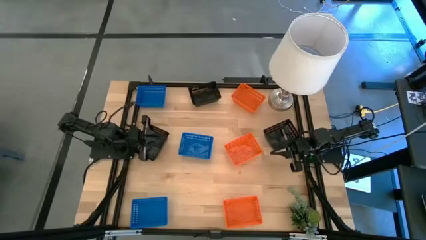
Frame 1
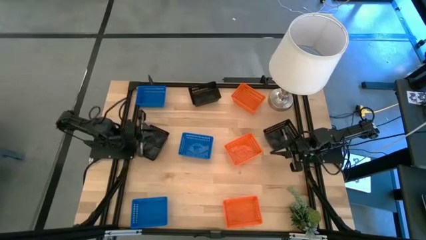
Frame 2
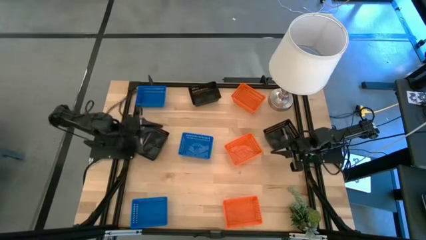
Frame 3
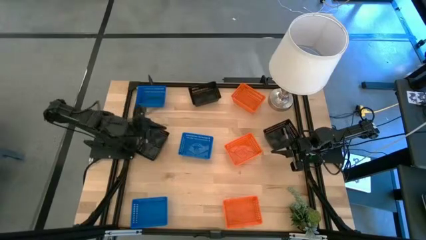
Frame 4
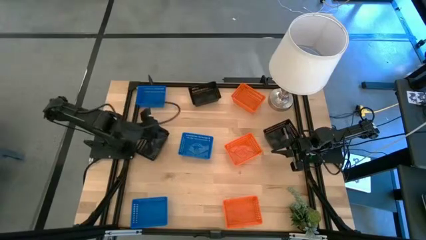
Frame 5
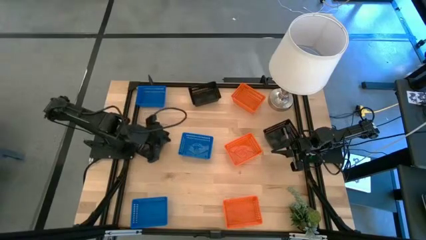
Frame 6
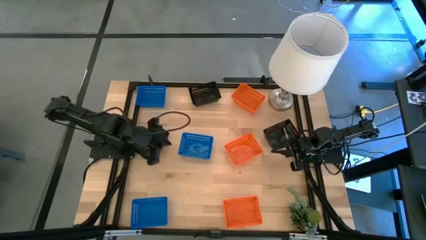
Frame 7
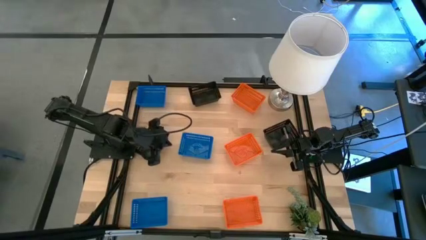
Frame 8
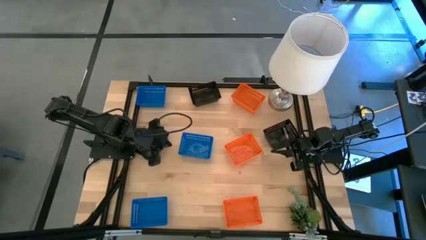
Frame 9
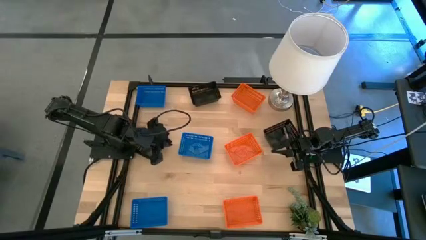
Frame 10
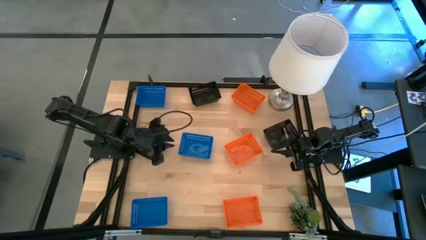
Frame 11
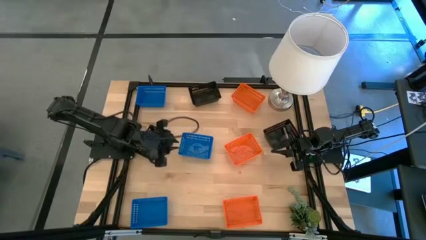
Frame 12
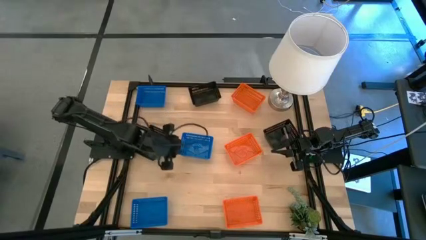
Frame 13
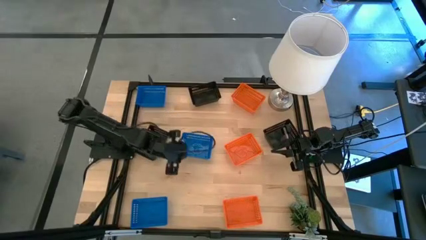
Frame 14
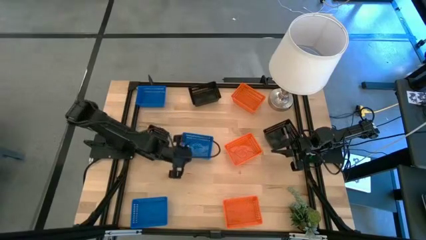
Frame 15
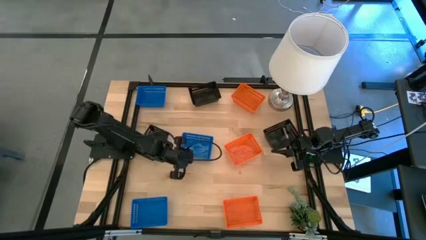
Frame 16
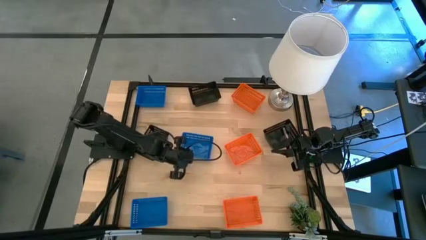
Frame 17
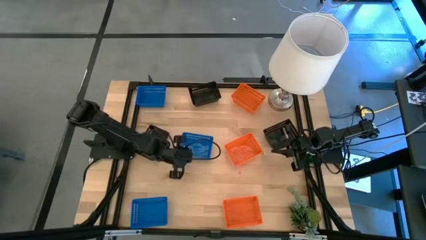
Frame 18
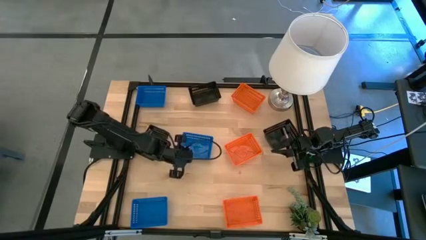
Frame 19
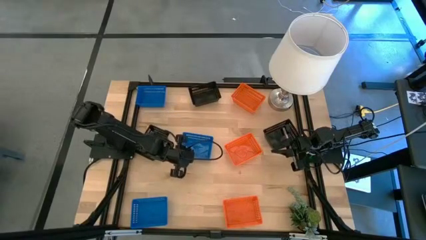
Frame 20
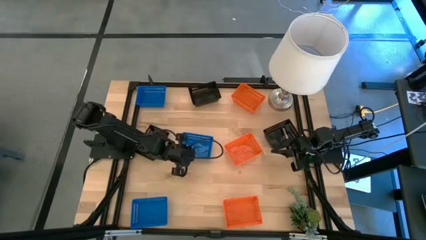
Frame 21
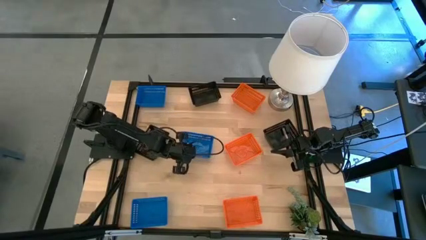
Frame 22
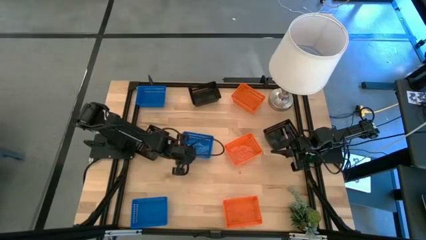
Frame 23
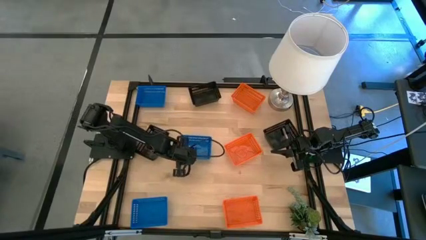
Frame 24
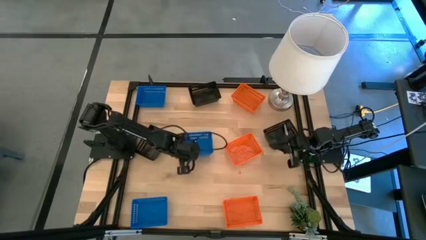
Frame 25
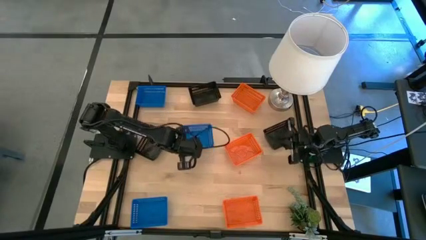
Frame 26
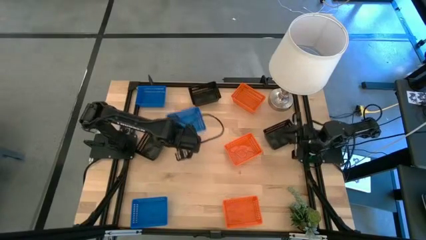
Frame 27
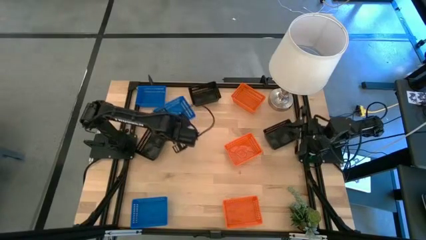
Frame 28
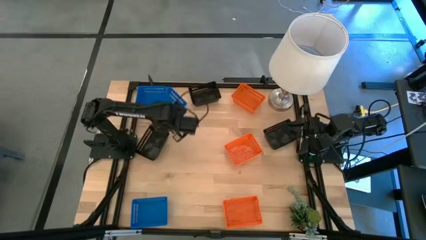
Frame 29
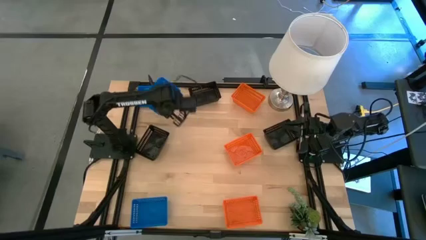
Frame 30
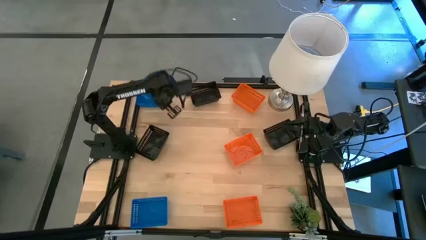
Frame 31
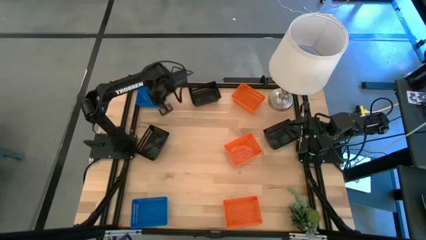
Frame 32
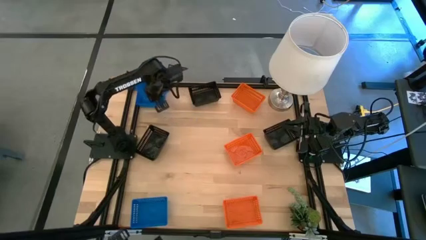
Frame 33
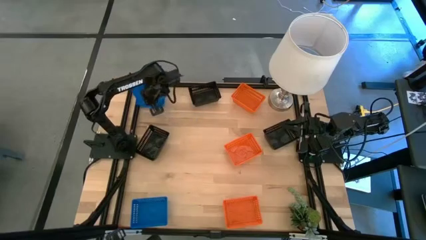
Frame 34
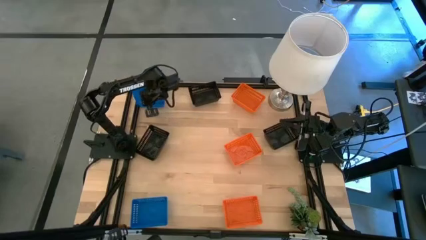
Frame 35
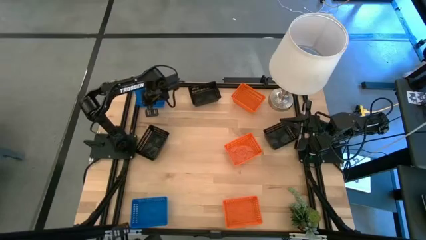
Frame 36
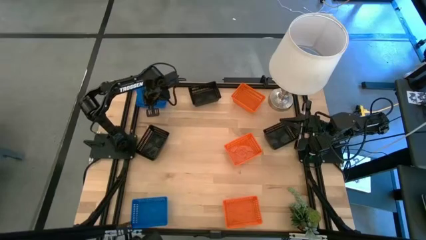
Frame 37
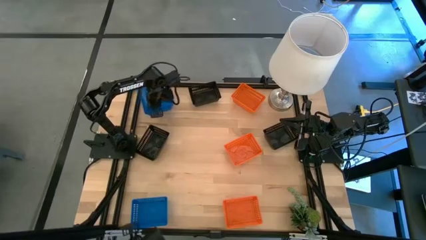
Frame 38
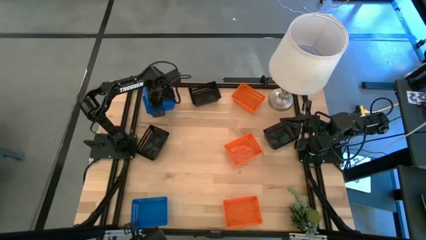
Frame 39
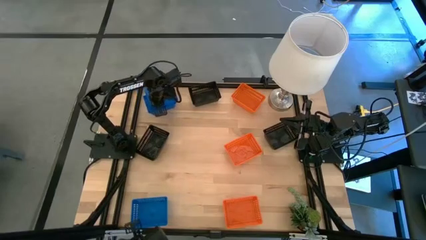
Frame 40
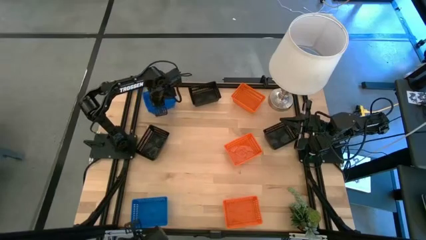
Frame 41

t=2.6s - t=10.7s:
Stack the middle blue bin on top of the top blue bin

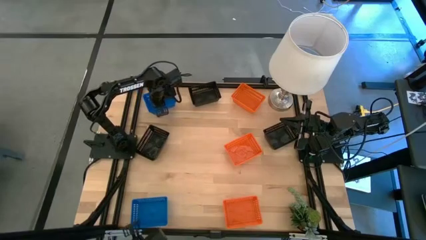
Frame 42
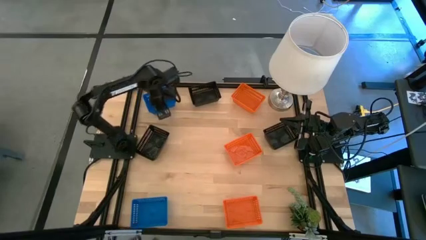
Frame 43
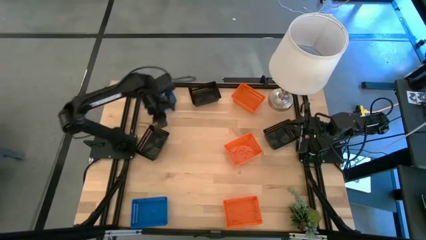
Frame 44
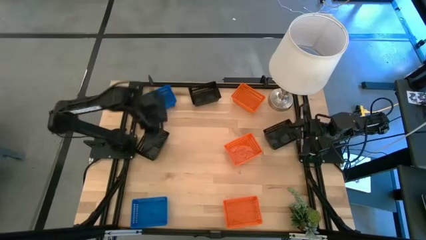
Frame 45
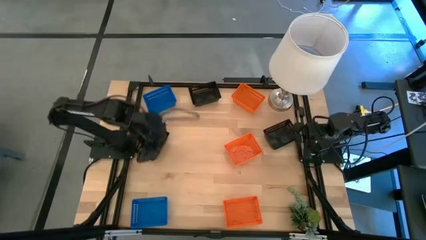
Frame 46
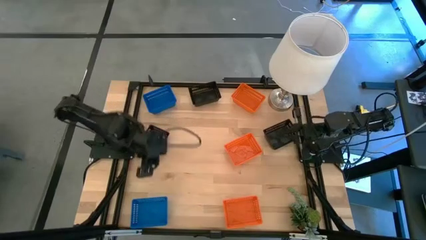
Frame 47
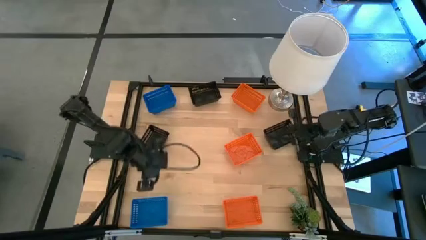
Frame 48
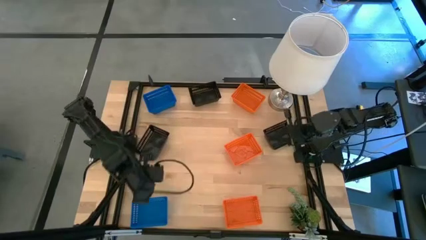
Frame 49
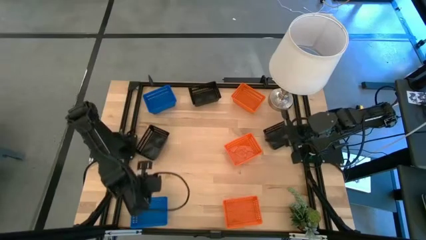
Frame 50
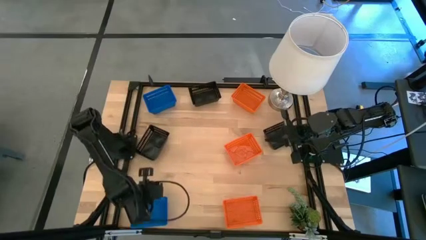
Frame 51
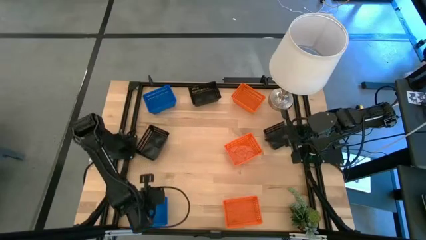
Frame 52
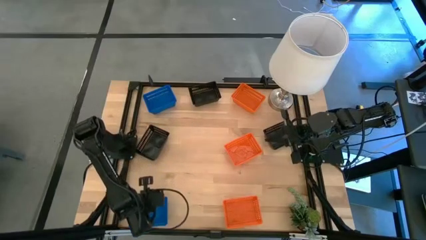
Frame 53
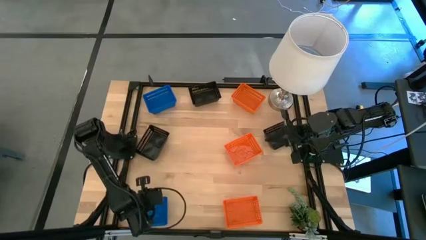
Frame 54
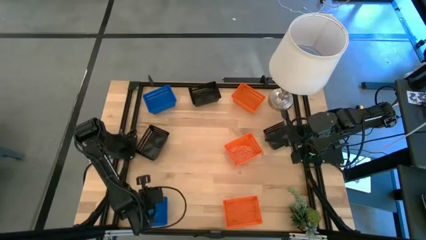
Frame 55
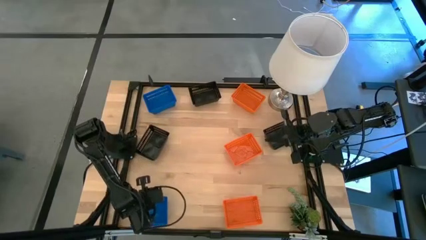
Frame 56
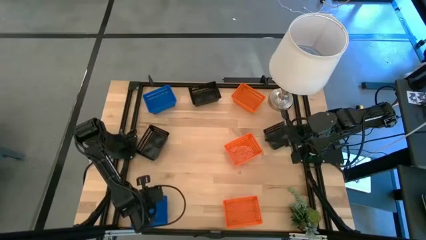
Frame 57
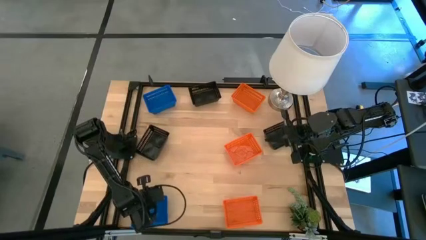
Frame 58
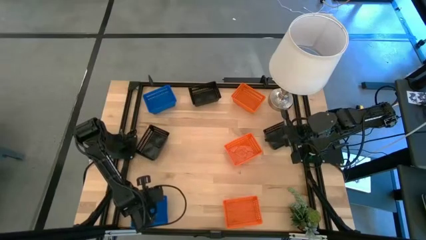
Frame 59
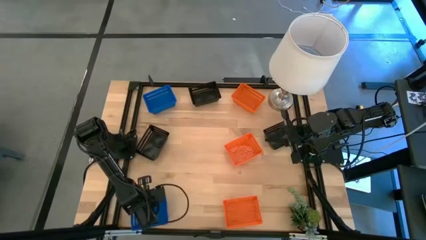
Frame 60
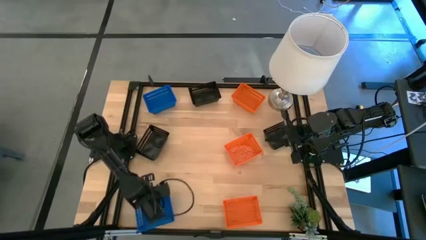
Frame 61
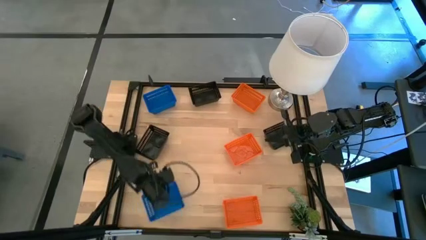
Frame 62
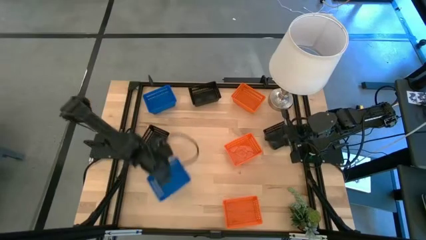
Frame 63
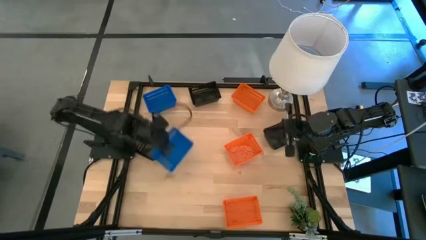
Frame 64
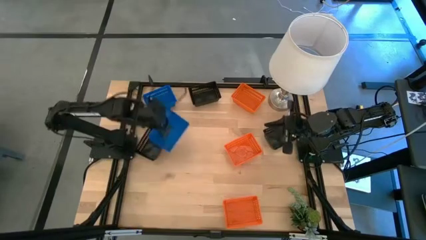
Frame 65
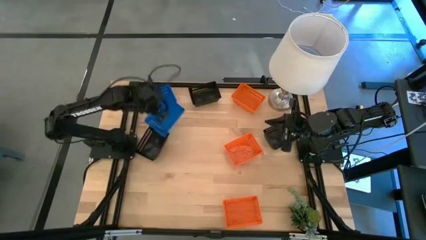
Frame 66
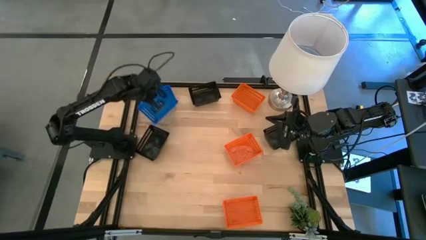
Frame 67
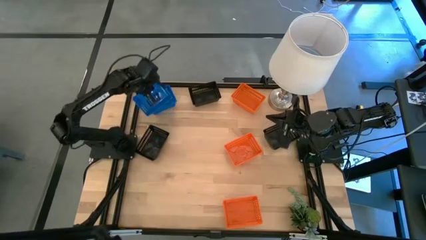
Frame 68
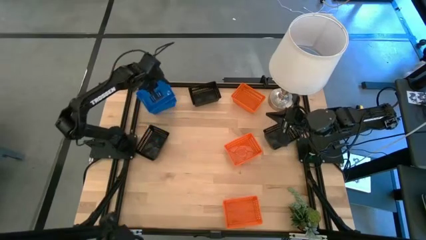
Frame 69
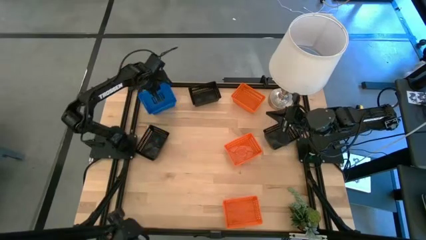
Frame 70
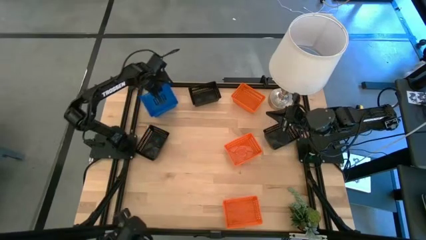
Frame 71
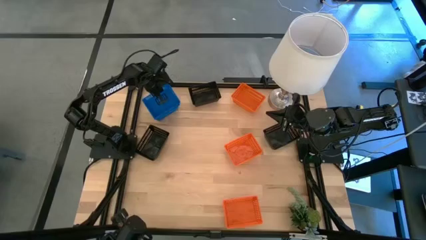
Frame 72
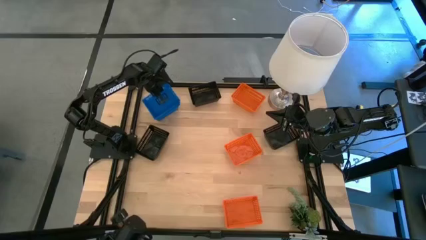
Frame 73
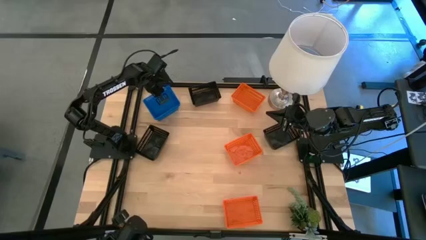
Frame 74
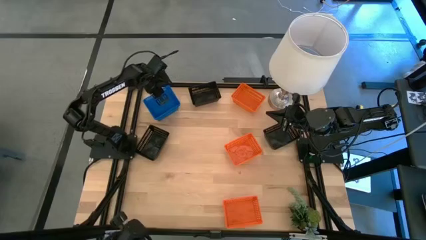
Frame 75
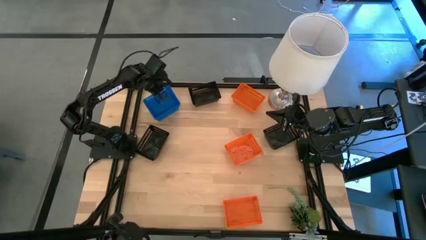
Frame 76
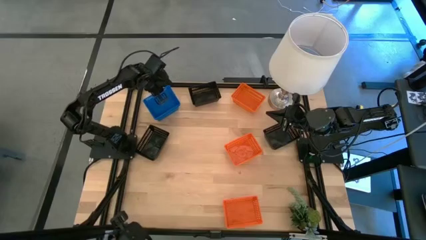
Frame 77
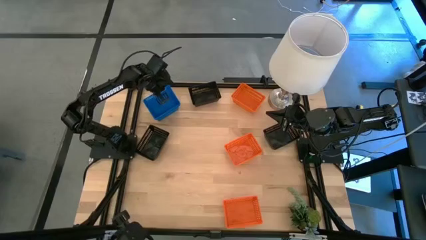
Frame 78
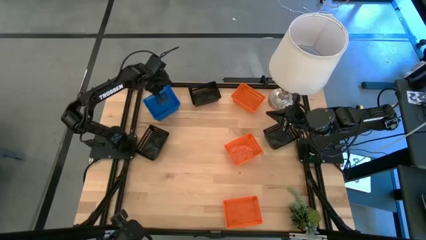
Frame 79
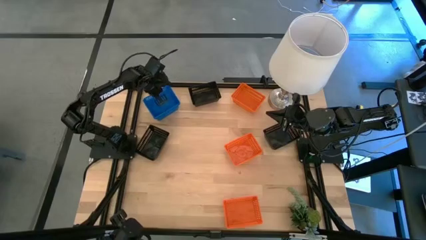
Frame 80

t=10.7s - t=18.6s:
Stack the bottom blue bin on top of the top blue bin
